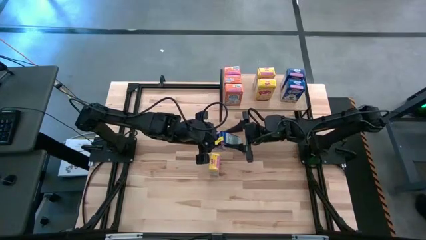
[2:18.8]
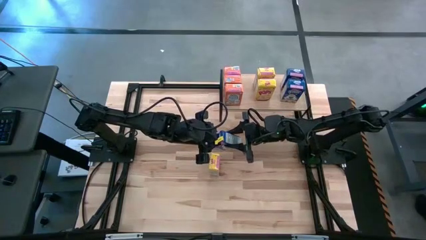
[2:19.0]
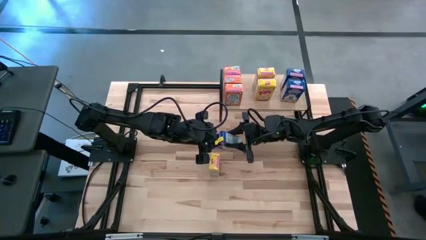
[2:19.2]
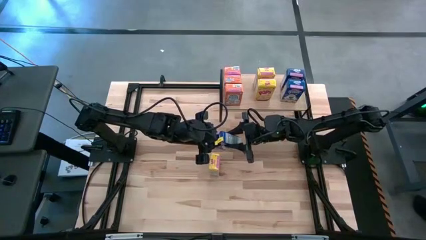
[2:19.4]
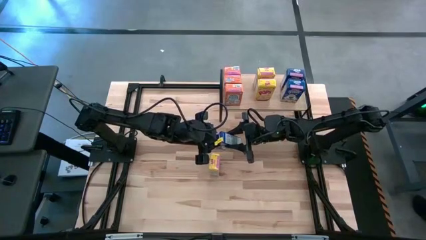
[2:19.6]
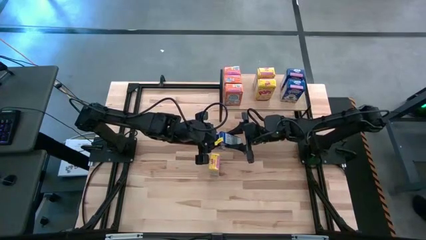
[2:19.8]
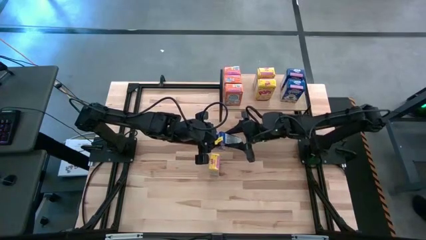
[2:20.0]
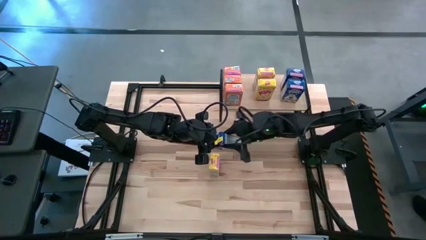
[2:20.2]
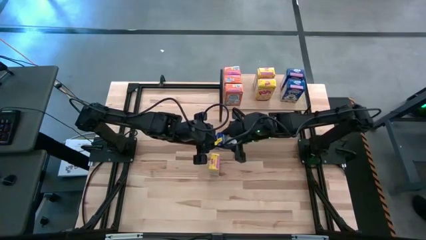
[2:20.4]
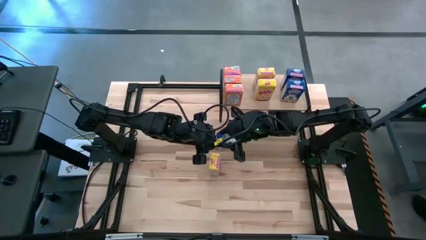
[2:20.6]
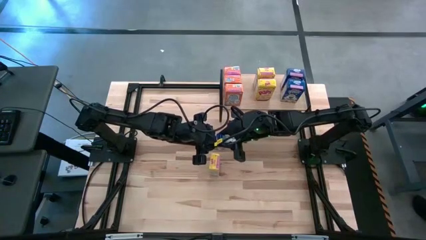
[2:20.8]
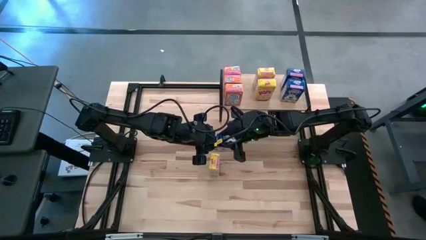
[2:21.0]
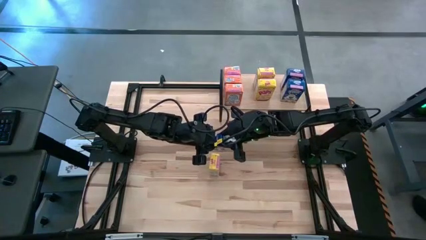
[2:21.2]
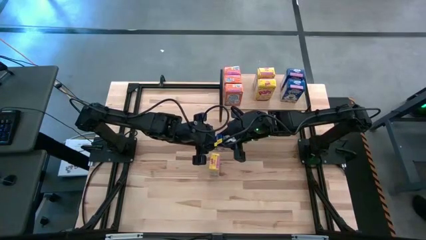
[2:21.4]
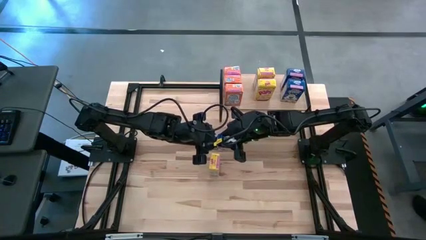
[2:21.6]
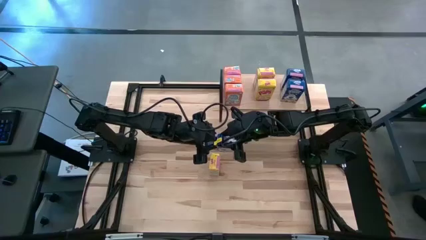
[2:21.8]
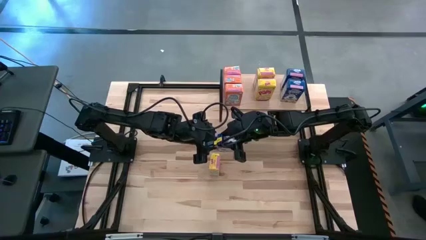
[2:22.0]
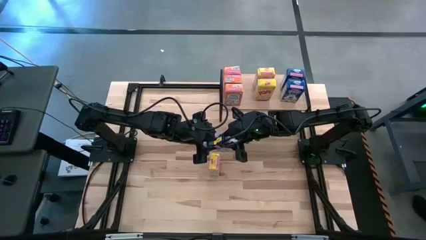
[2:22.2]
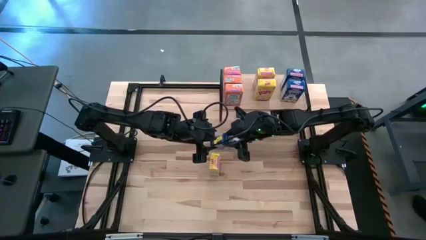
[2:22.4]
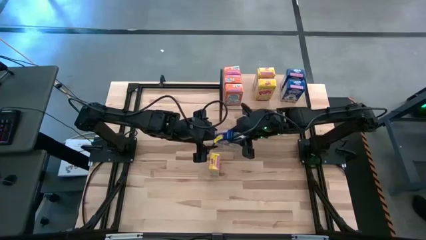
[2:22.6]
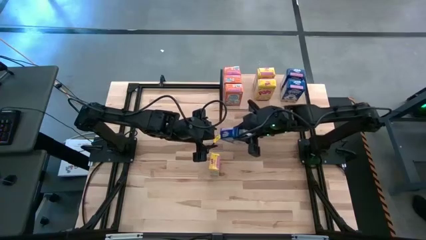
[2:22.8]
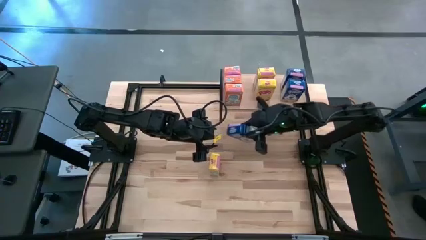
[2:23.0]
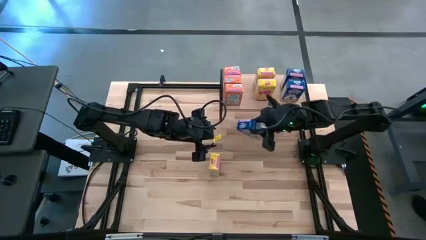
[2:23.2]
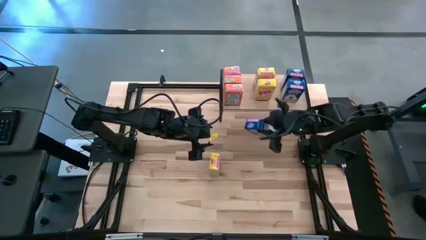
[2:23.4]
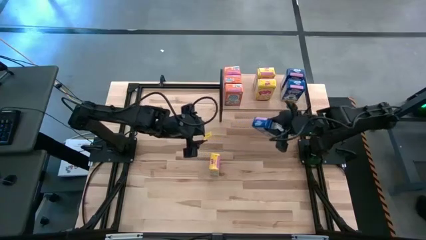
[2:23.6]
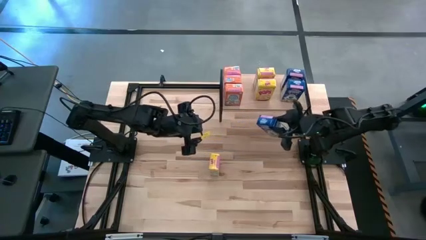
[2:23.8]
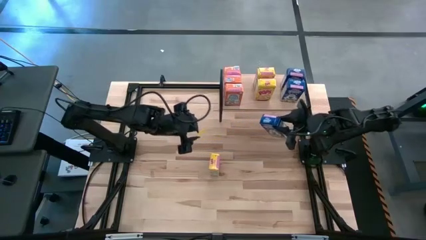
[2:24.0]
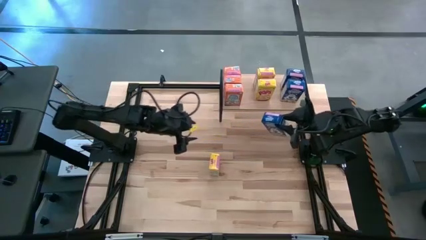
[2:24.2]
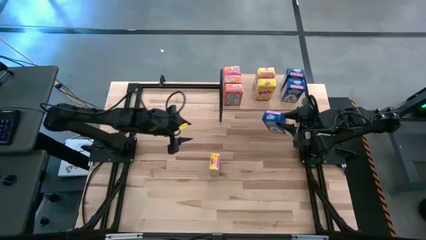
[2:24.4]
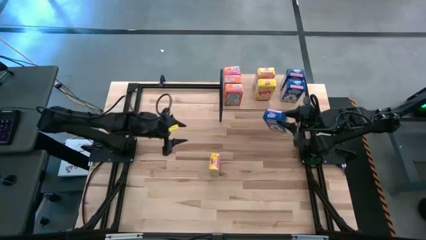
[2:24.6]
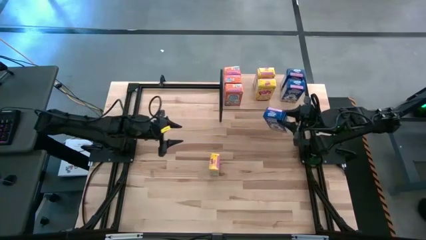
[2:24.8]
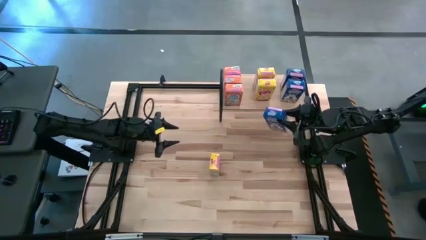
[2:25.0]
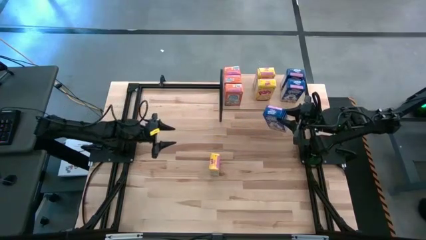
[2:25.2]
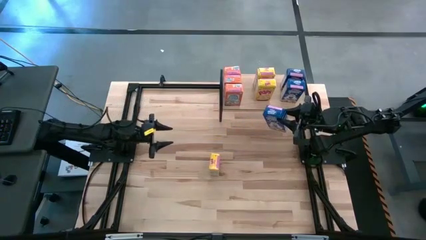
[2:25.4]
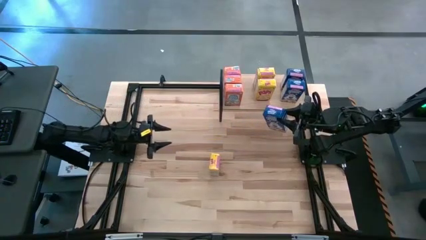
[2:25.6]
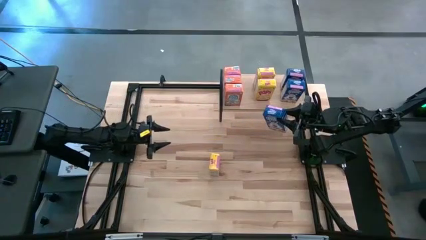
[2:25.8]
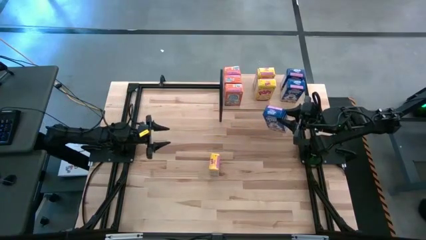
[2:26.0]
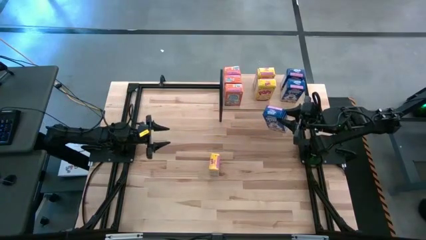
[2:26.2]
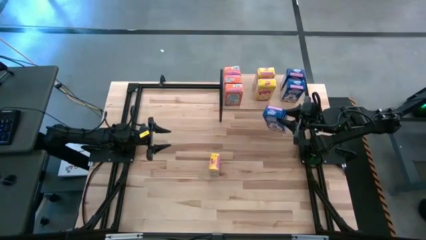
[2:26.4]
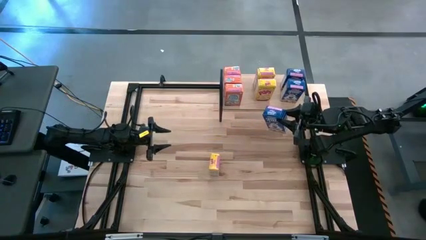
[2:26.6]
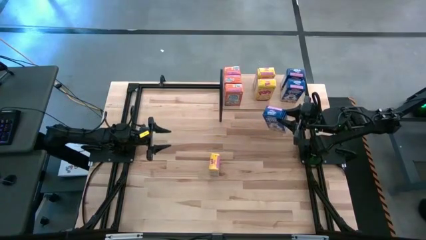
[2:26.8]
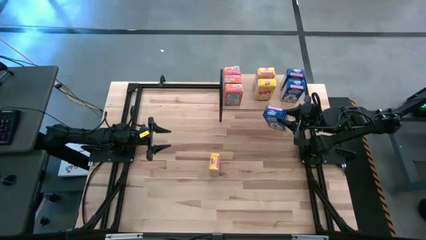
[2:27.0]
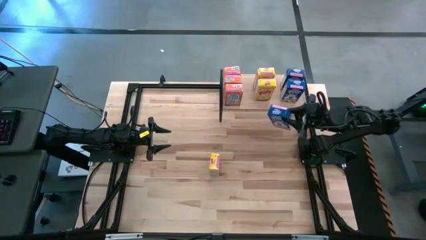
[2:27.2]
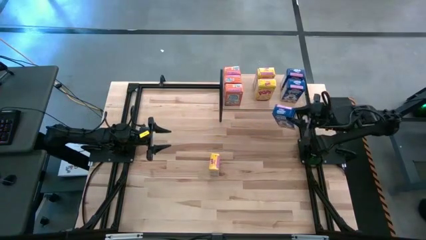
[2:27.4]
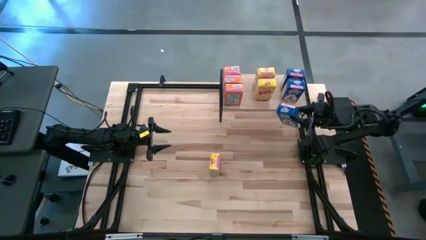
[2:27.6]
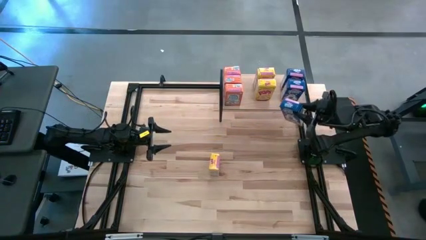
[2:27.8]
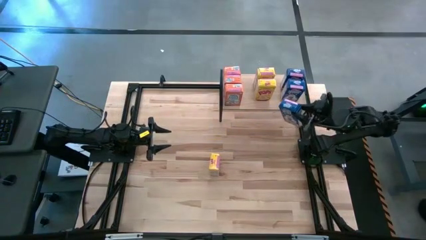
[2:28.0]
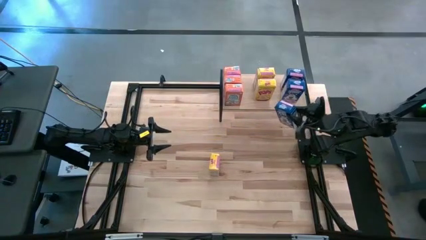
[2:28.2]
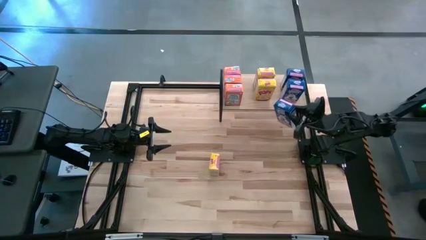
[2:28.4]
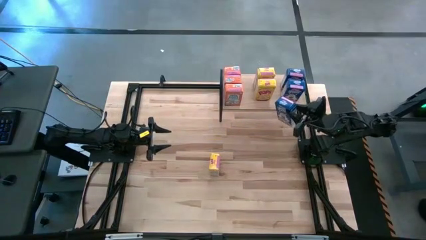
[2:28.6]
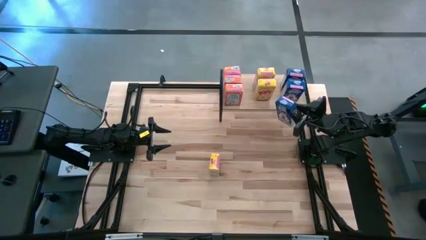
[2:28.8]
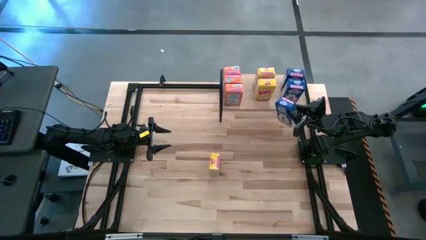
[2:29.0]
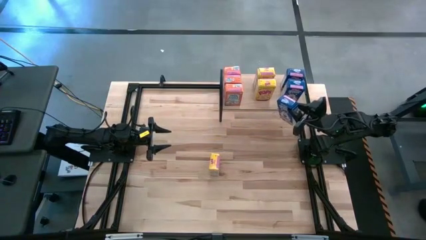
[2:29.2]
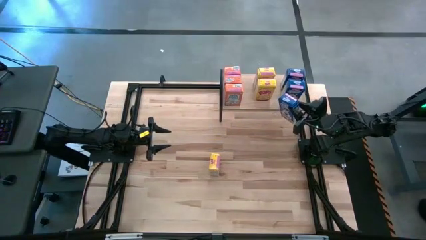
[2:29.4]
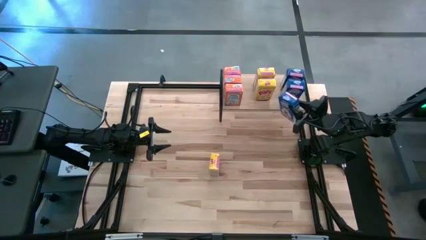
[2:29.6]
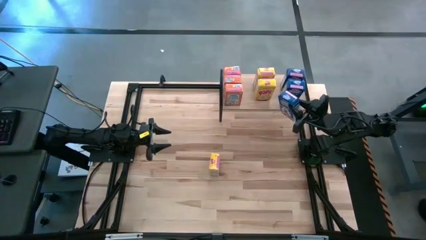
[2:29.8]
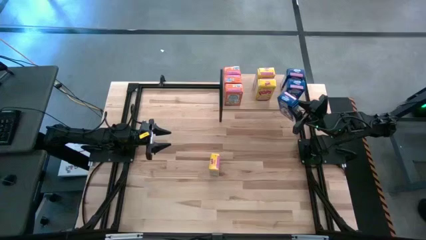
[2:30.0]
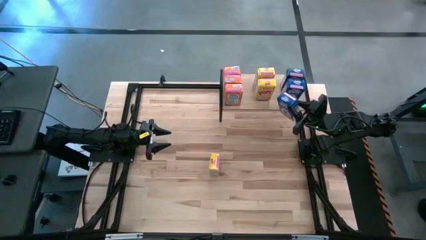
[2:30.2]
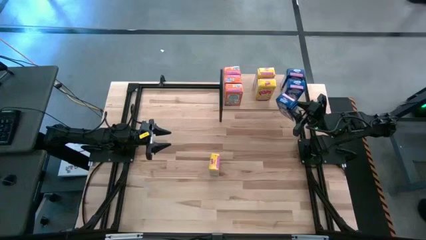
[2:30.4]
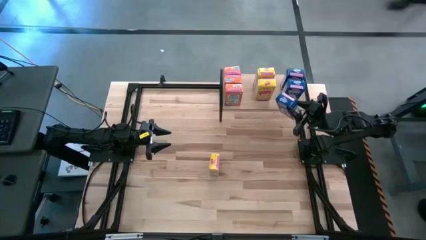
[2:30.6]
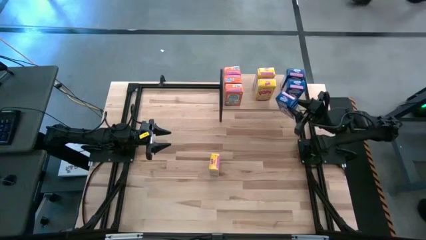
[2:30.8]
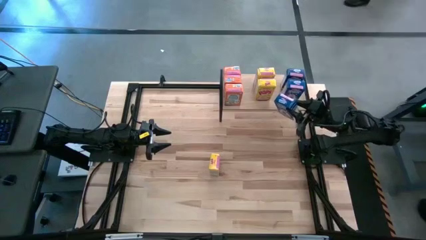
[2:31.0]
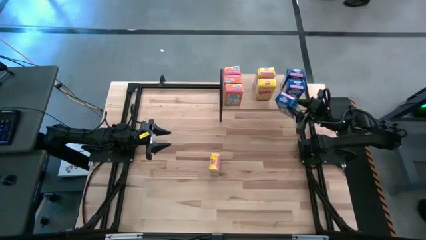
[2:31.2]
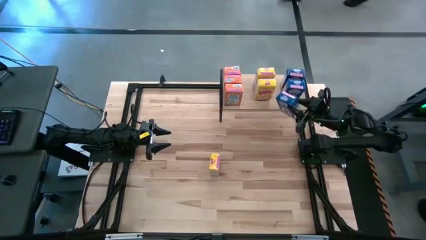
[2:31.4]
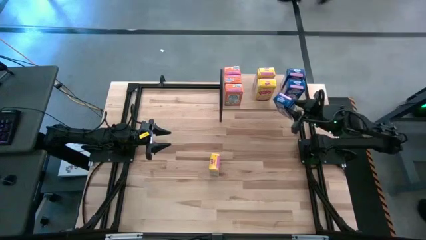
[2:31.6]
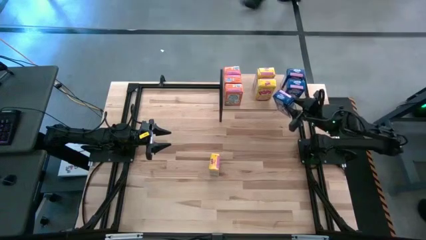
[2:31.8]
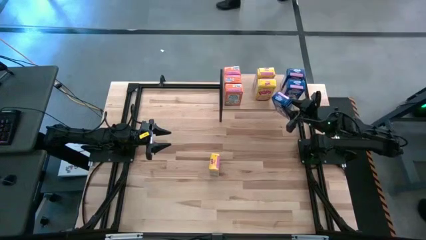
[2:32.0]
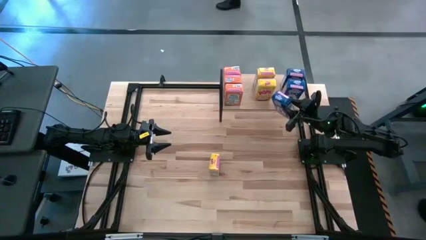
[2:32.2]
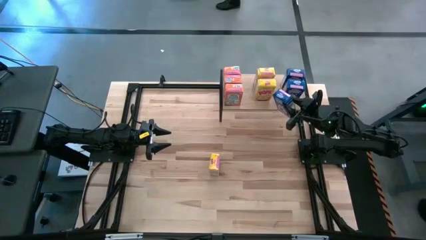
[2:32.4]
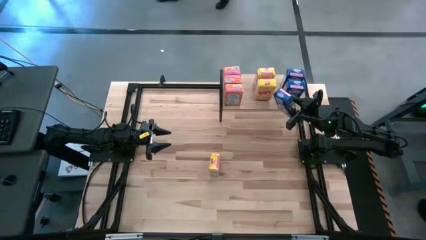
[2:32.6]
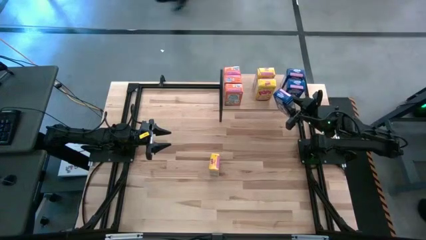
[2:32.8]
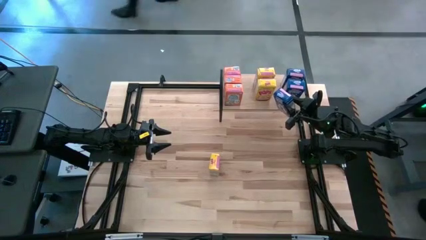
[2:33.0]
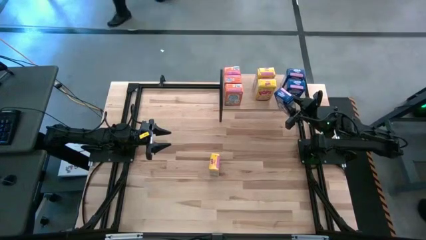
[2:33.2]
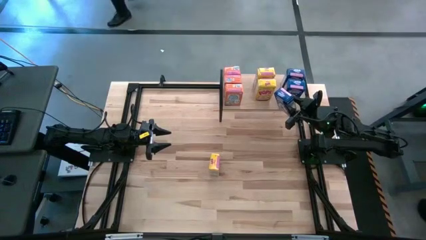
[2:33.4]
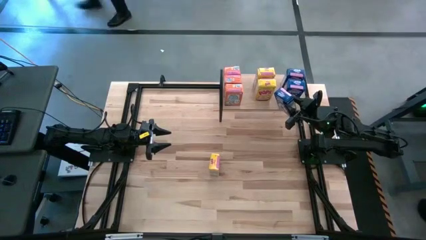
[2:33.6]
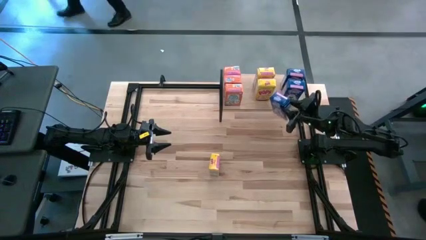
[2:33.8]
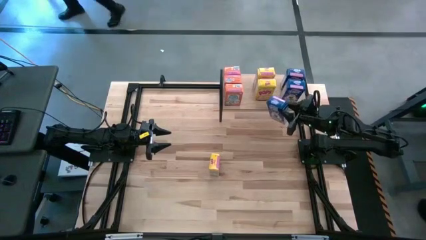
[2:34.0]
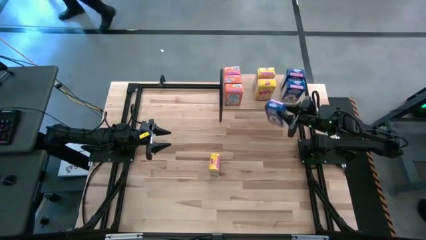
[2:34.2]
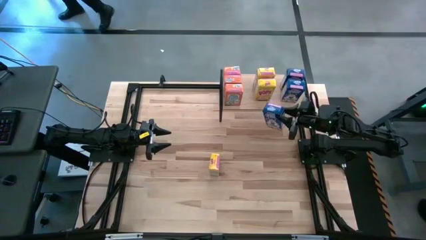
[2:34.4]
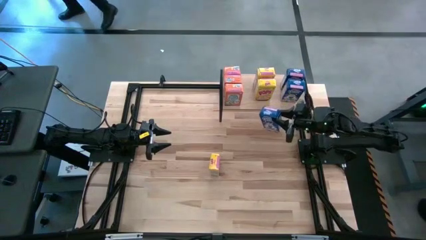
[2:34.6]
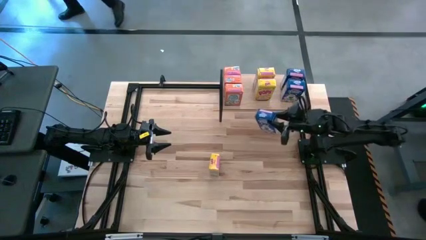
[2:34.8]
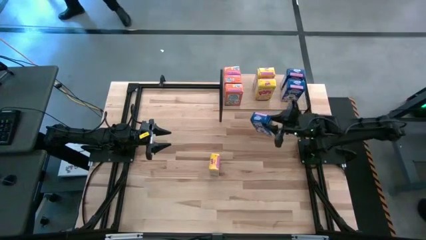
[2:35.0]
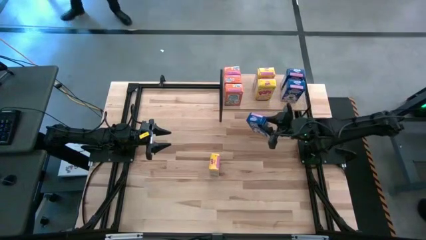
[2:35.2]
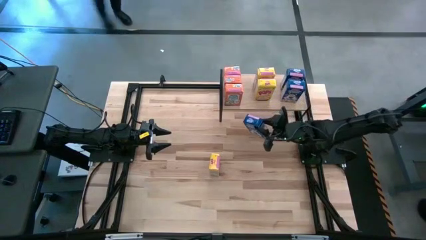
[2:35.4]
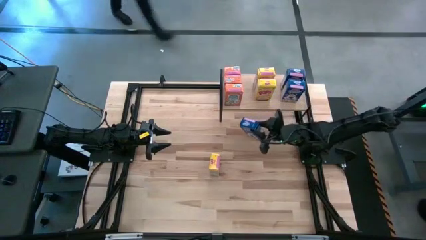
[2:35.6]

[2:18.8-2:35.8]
Task: Stack cereal on shelf
Put the blue cereal box on the shelf aligned with the blue cereal boxes
